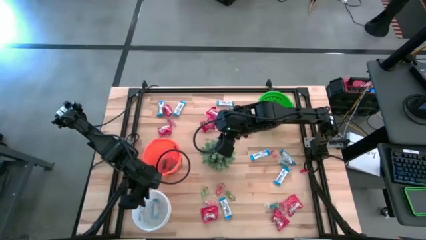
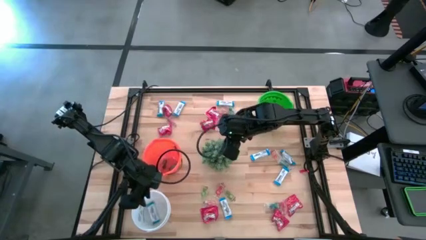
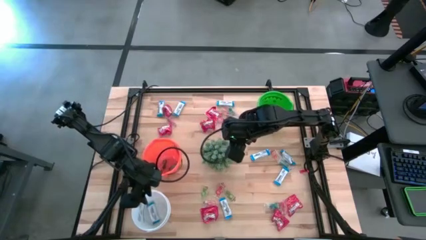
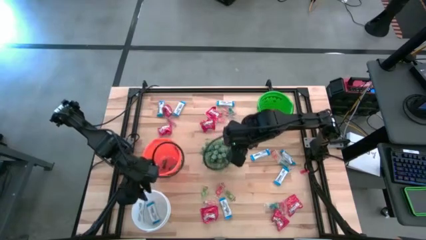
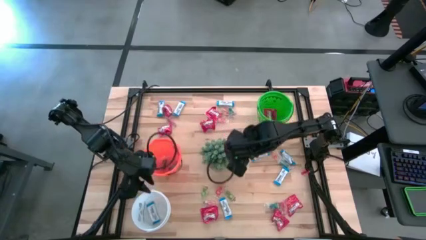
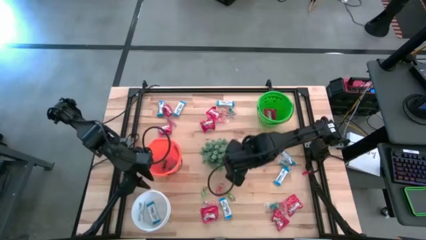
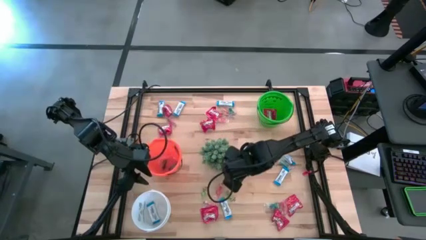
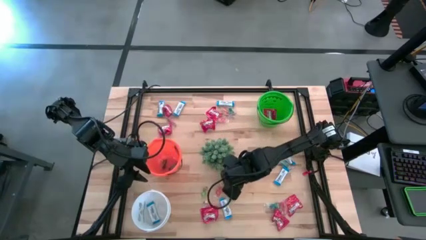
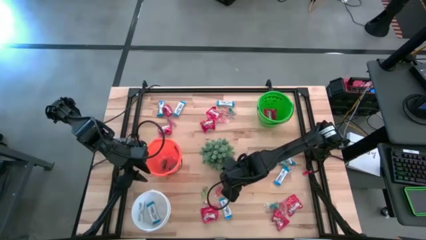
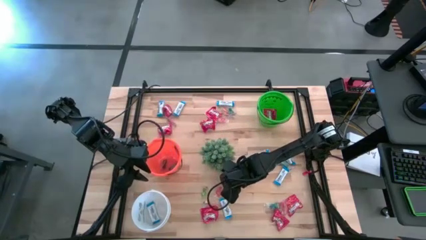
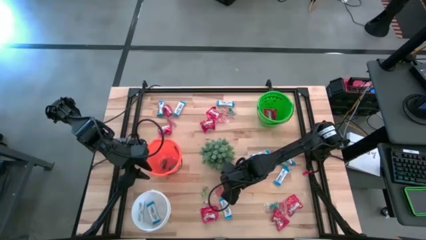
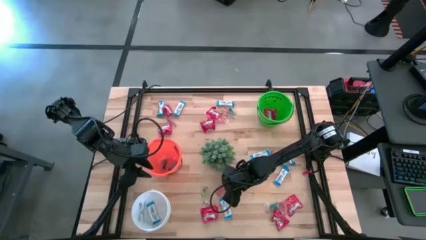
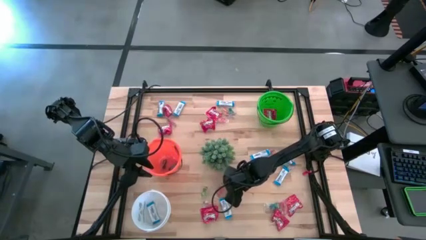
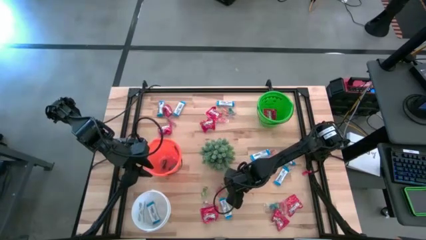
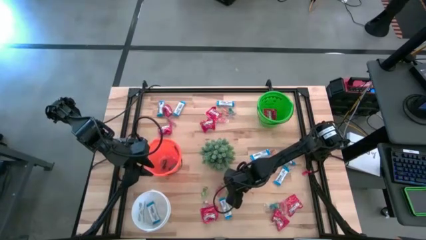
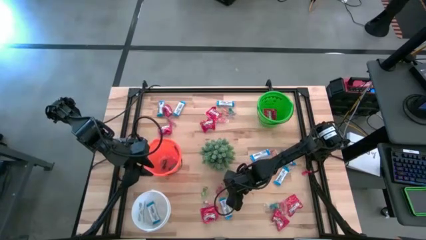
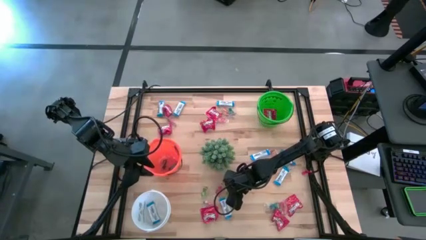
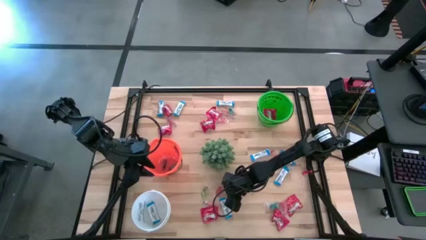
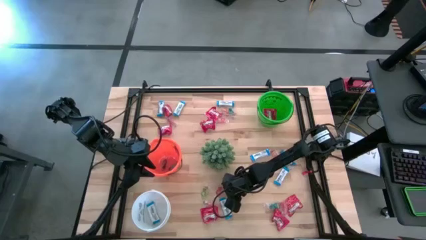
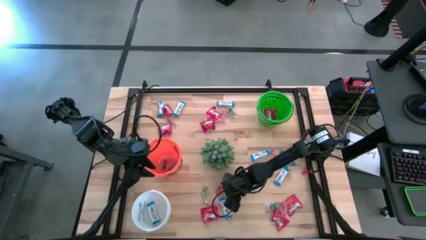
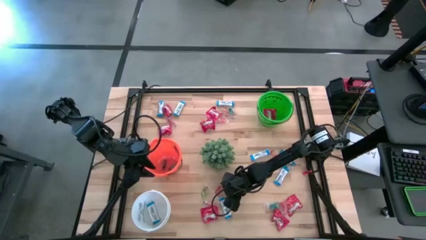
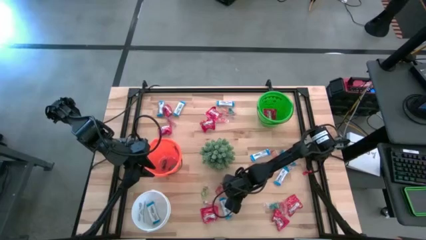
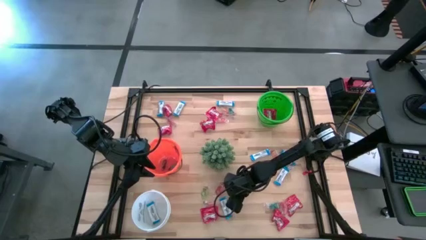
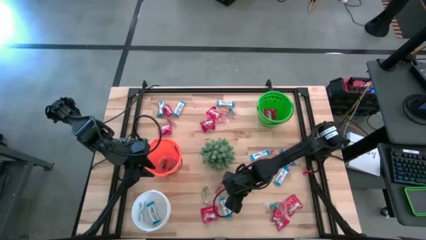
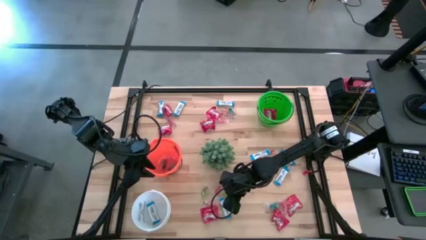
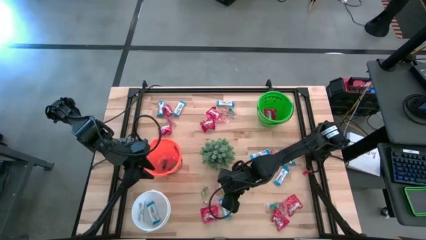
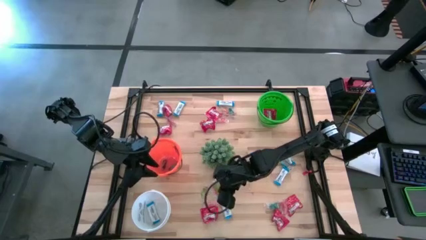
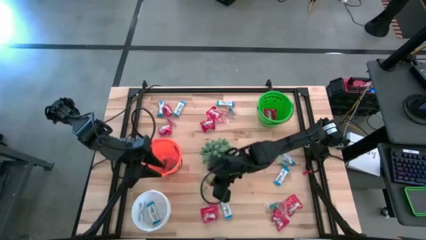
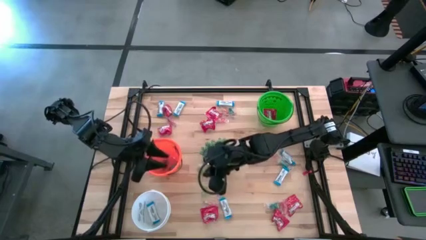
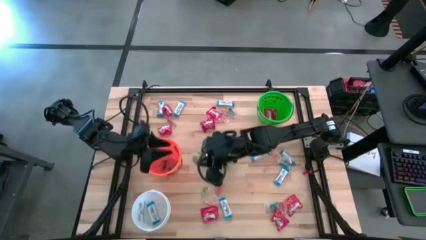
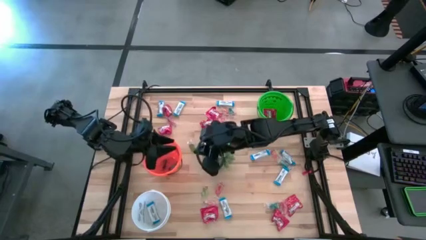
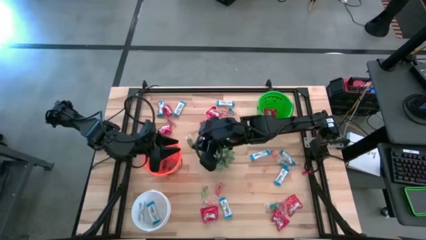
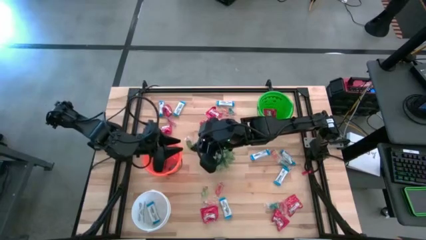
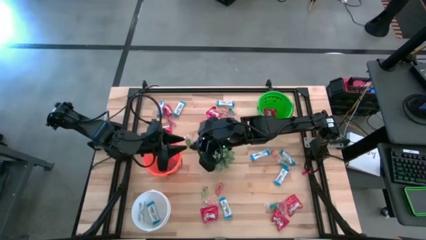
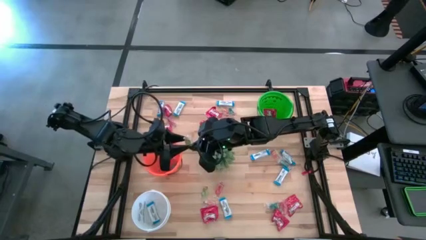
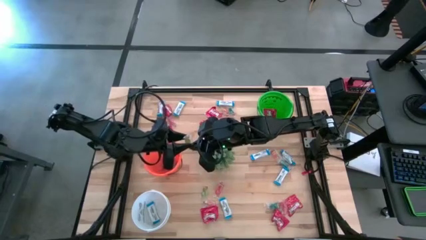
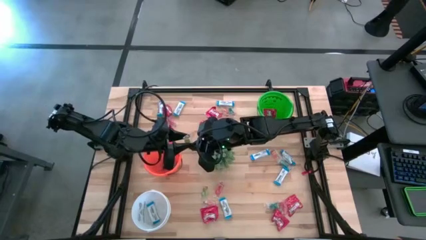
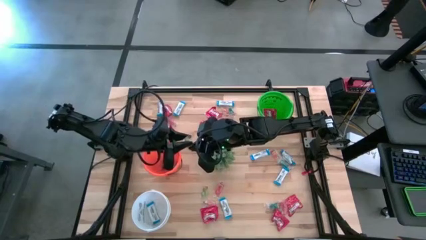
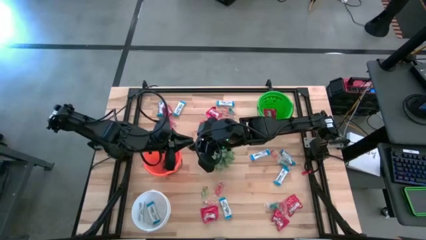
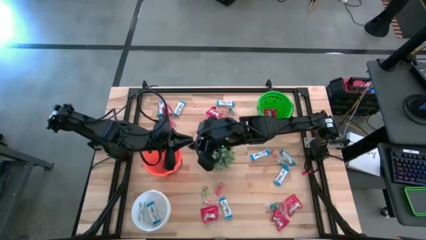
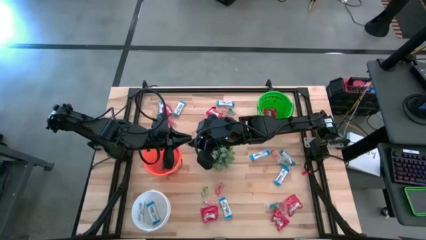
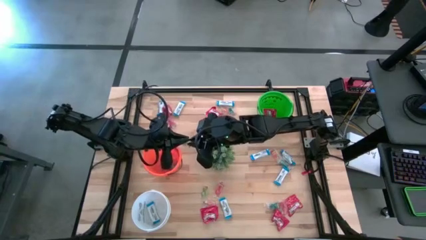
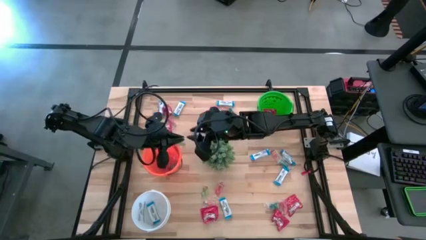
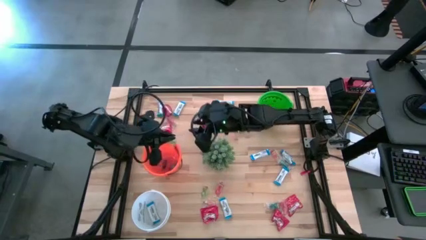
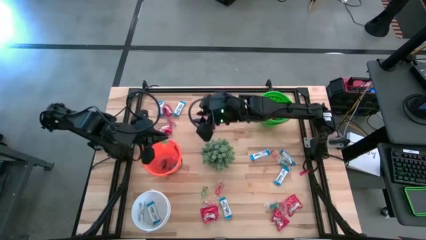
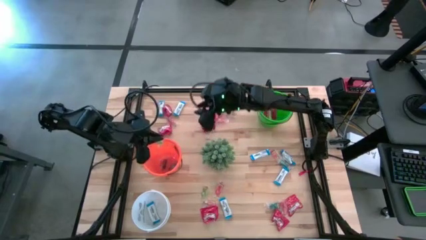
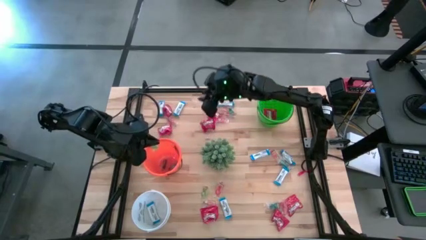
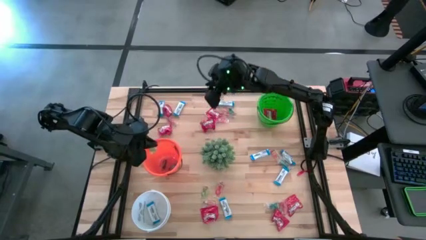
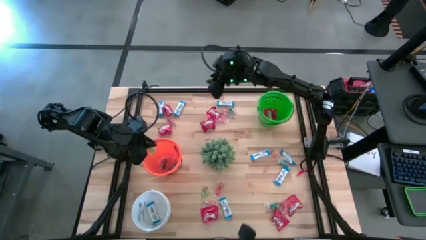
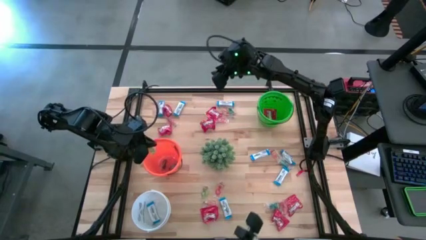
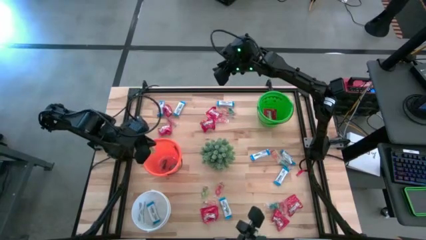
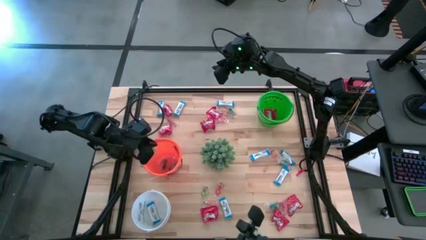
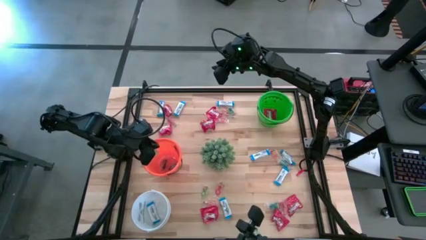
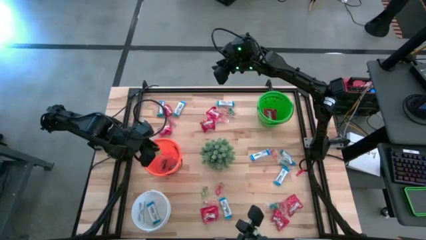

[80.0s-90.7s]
Task: Sort candy
Put the green gummy into the orange bucket

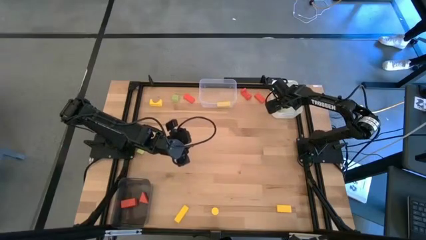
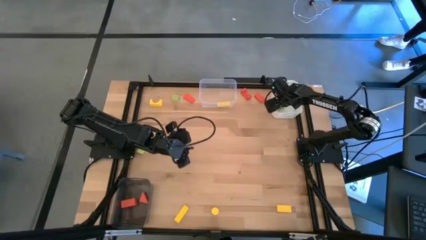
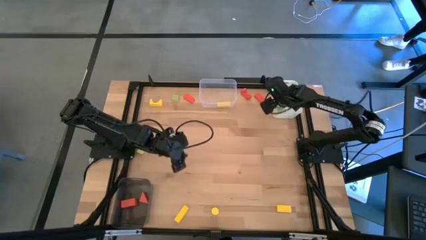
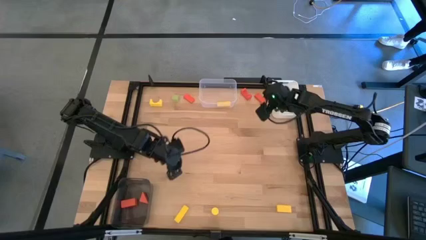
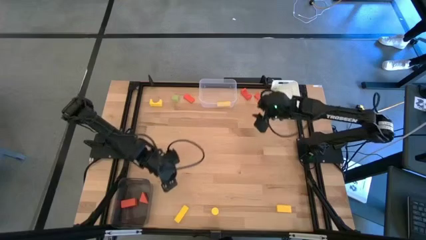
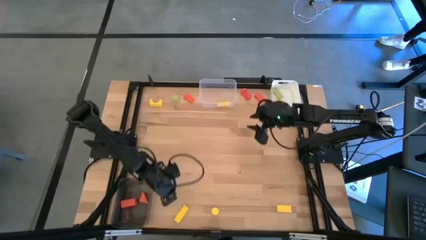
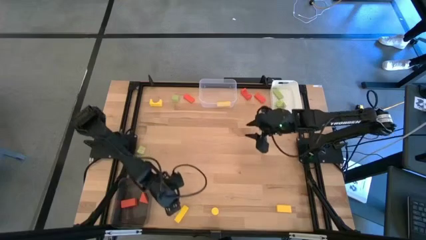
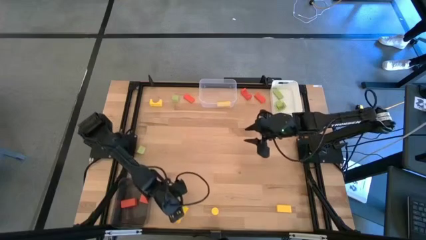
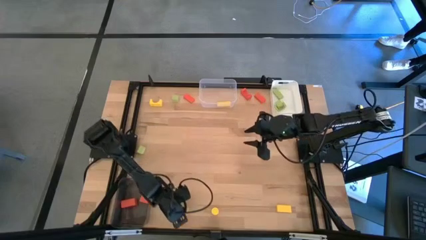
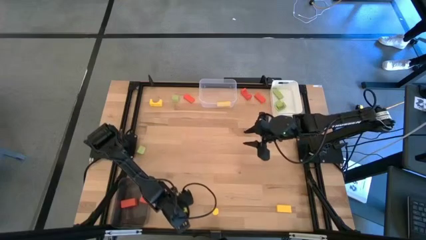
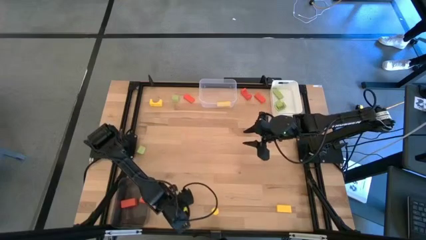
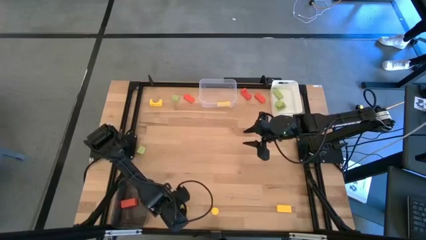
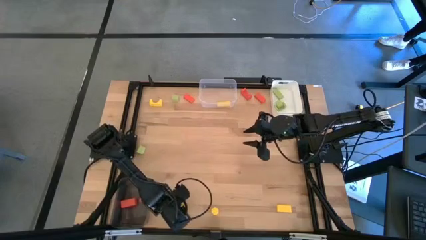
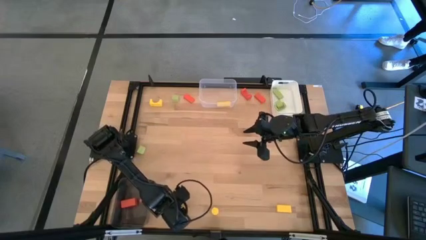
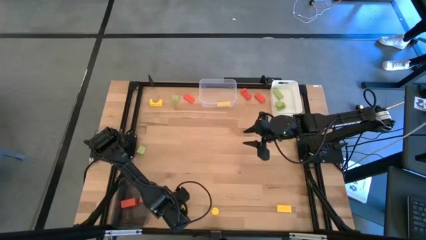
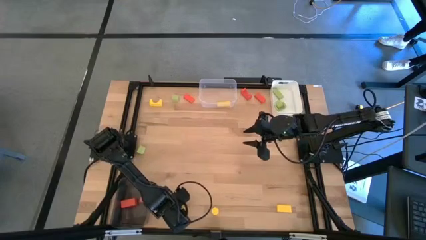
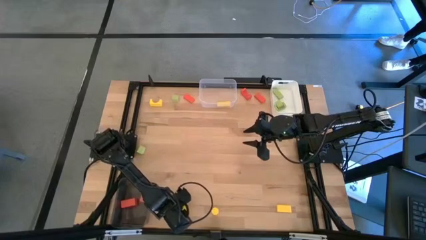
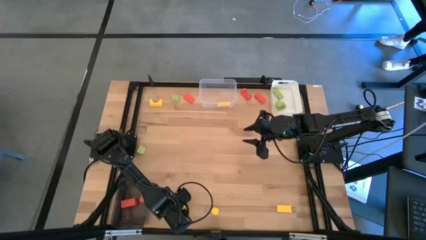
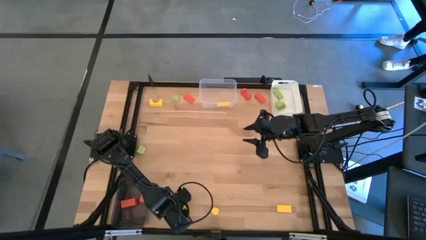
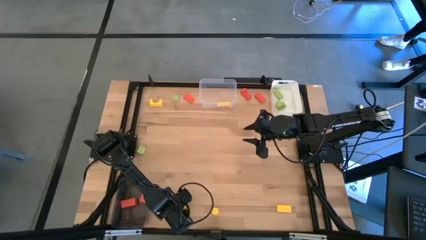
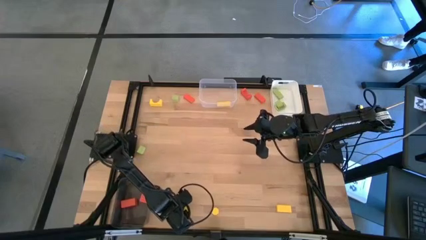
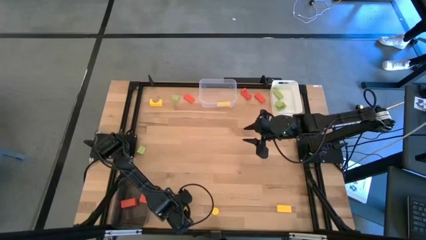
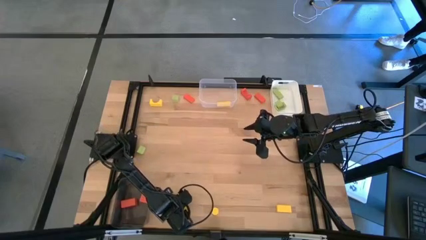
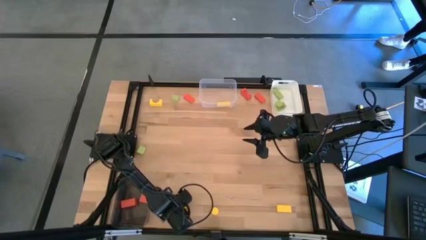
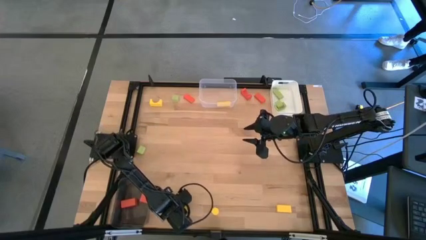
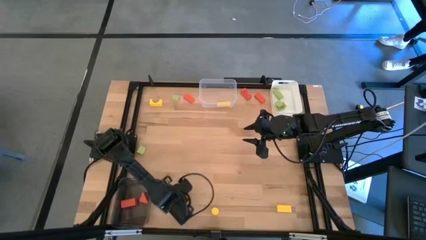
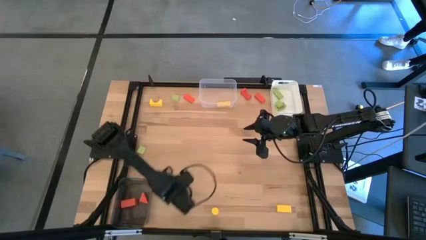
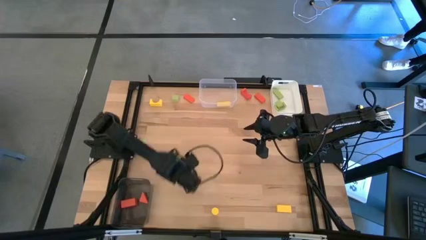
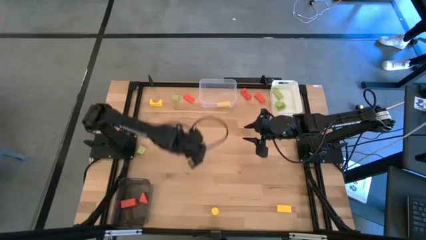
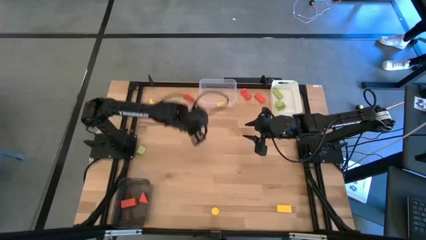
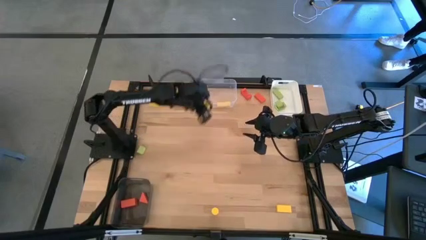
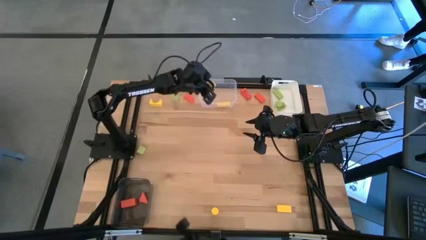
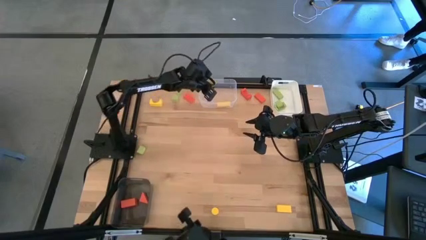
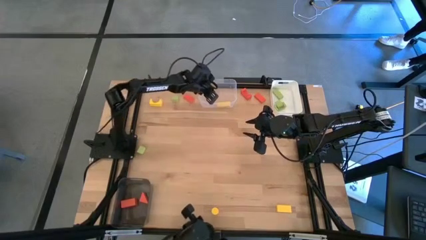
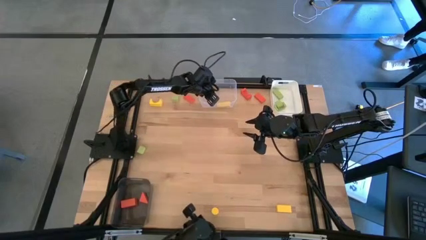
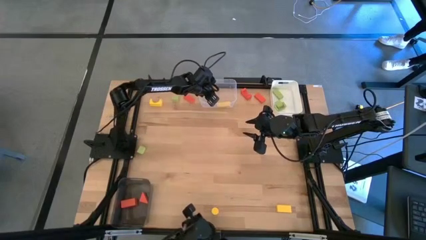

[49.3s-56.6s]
Task: Sort & place blocks by color
Put the yellow rectangular block into the transparent bin
